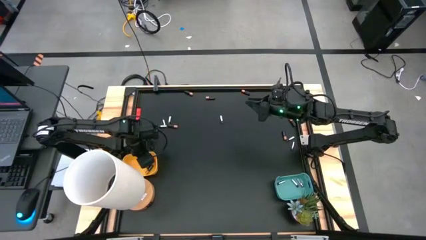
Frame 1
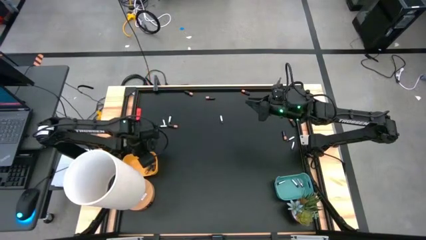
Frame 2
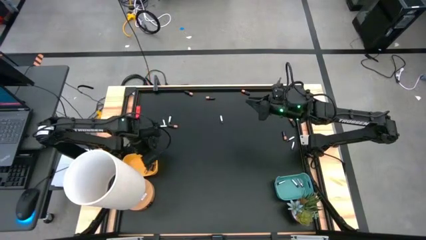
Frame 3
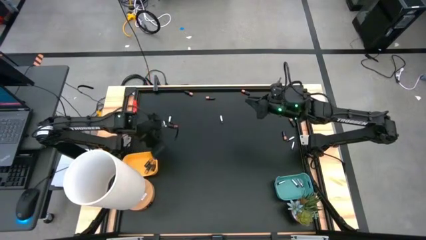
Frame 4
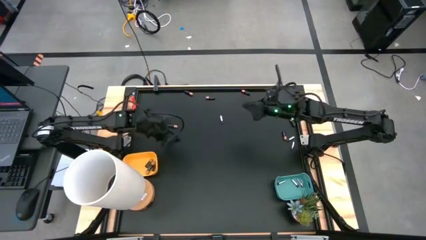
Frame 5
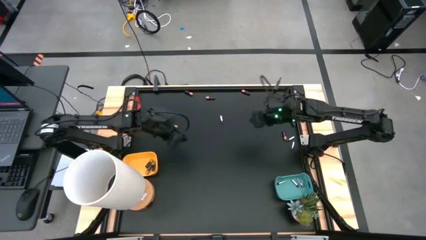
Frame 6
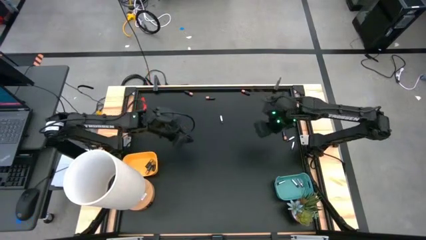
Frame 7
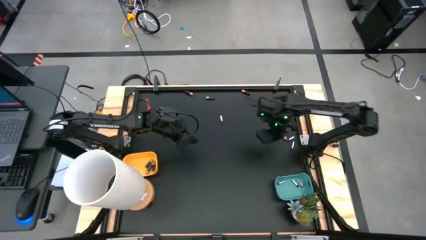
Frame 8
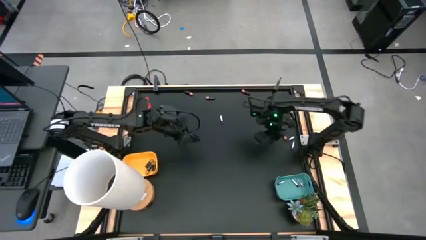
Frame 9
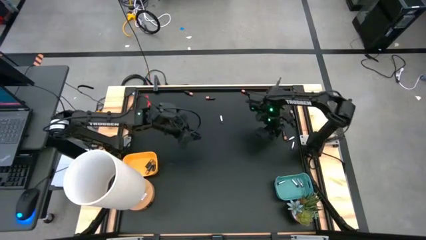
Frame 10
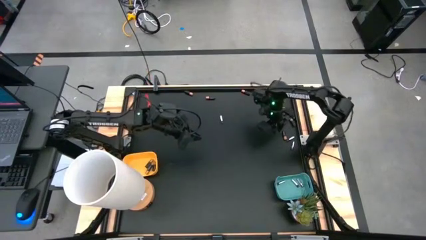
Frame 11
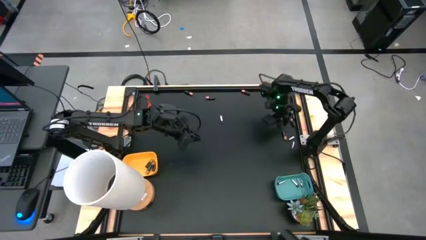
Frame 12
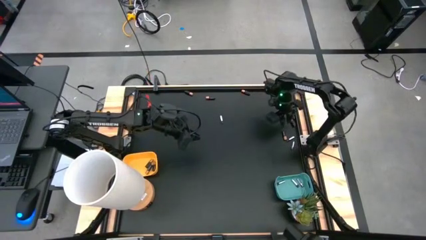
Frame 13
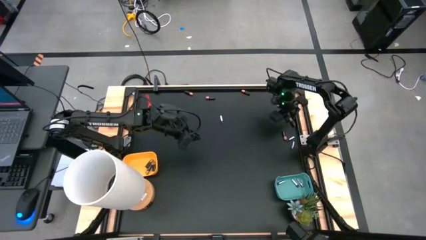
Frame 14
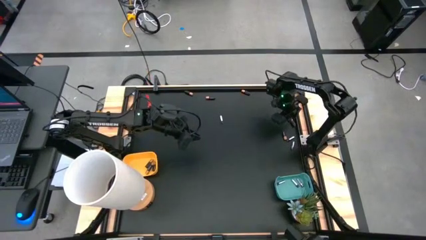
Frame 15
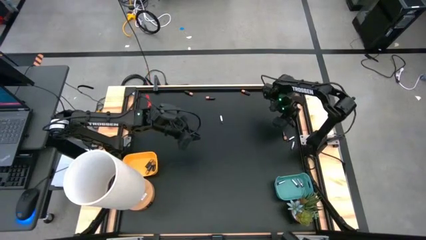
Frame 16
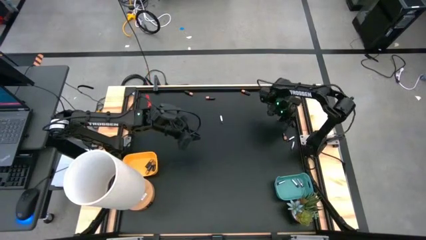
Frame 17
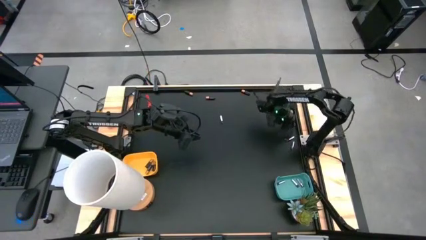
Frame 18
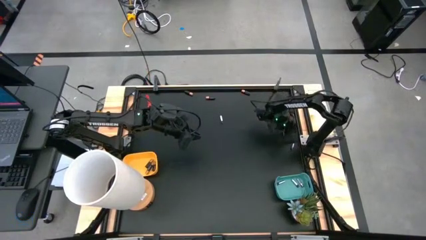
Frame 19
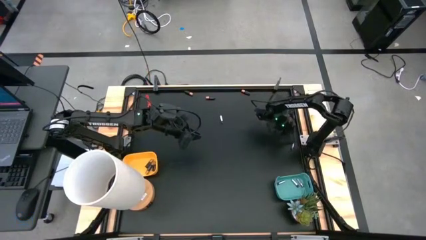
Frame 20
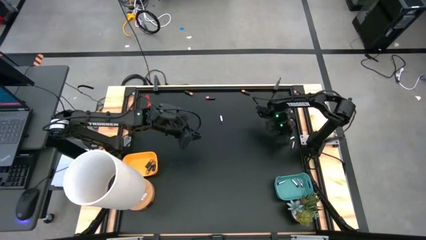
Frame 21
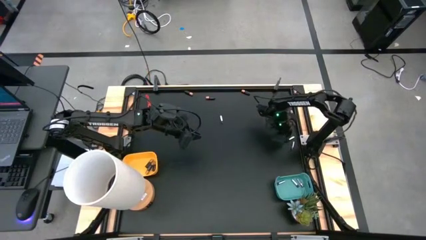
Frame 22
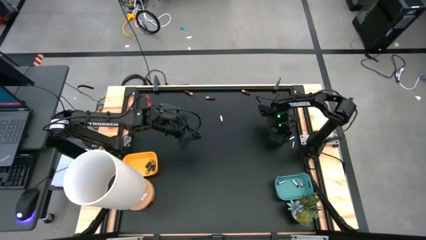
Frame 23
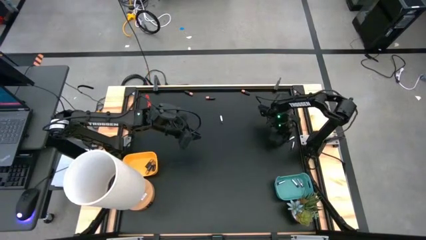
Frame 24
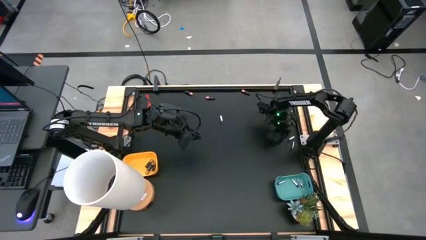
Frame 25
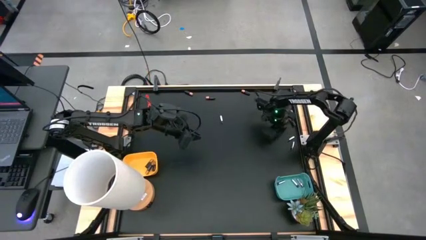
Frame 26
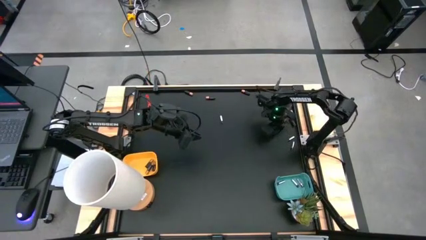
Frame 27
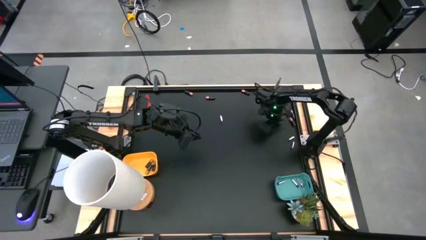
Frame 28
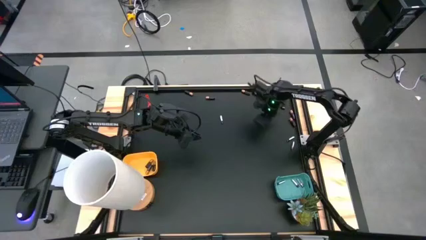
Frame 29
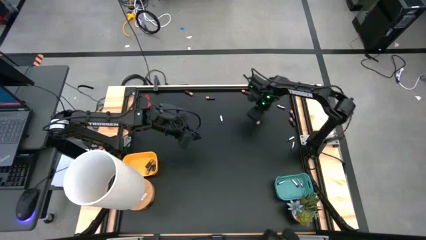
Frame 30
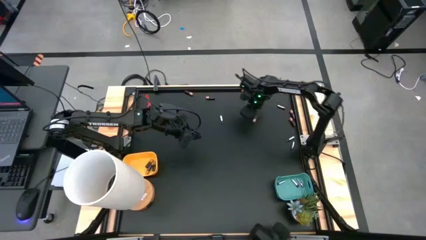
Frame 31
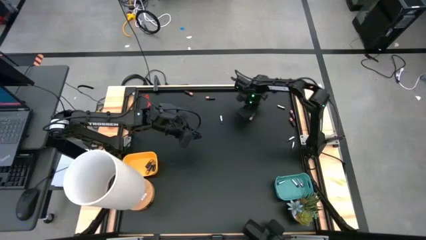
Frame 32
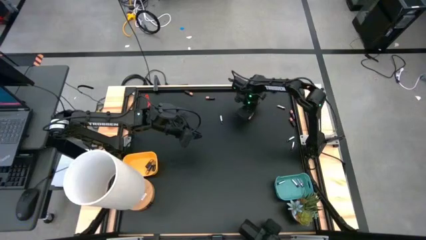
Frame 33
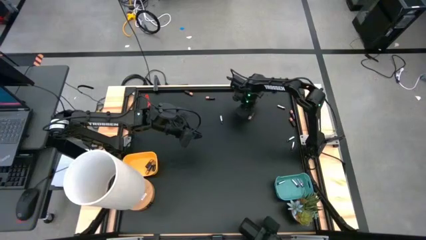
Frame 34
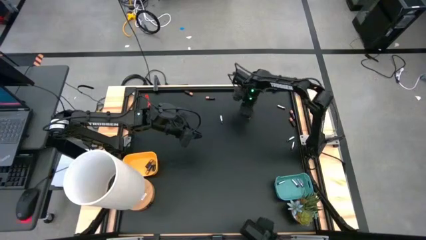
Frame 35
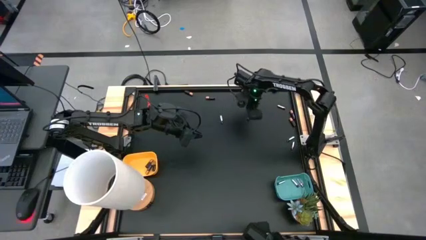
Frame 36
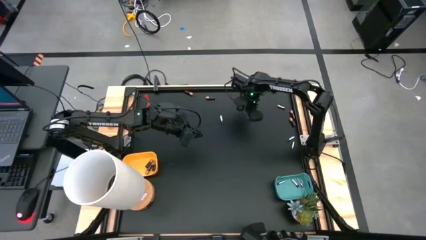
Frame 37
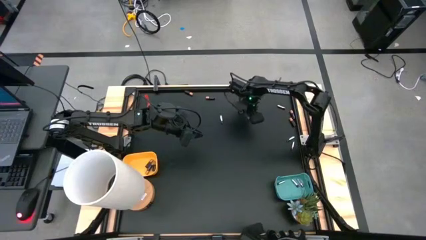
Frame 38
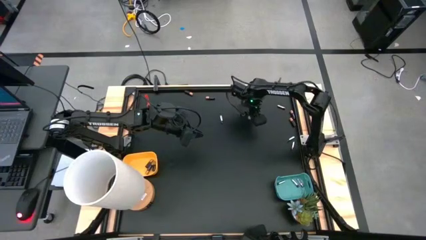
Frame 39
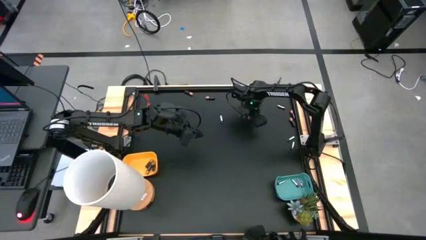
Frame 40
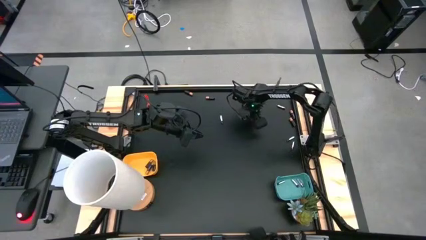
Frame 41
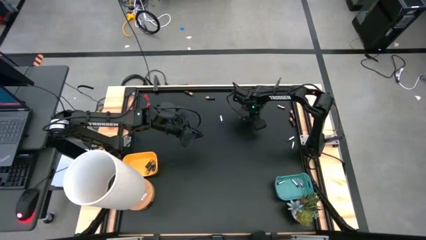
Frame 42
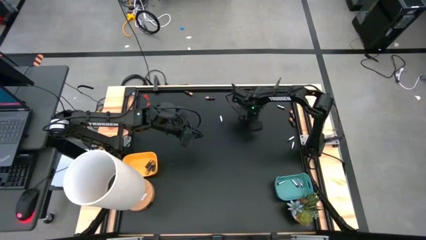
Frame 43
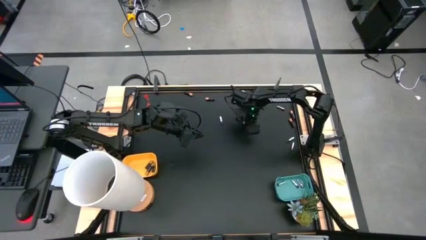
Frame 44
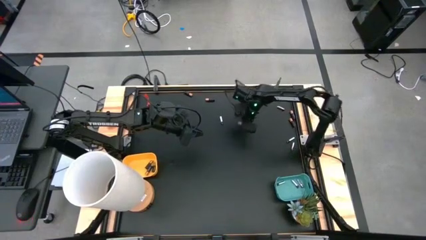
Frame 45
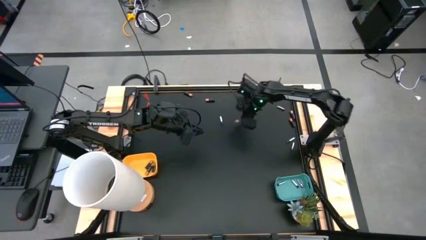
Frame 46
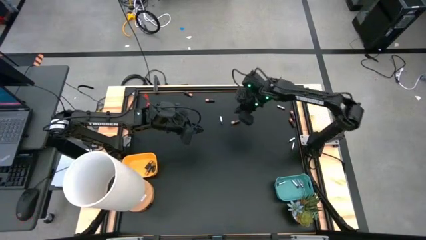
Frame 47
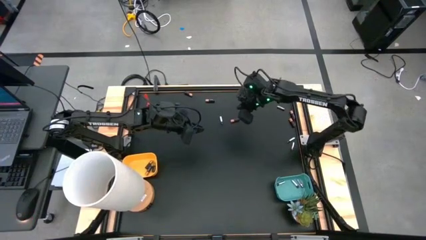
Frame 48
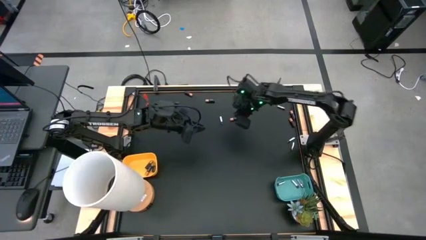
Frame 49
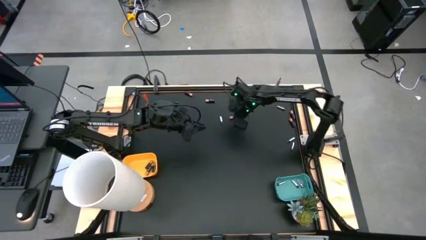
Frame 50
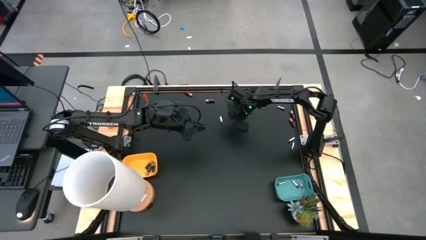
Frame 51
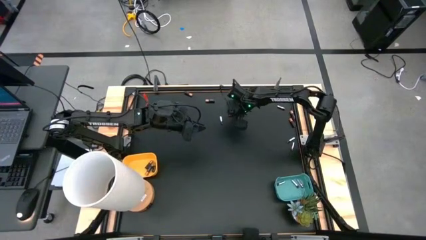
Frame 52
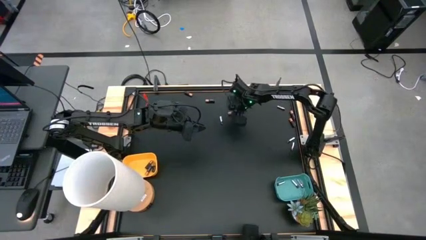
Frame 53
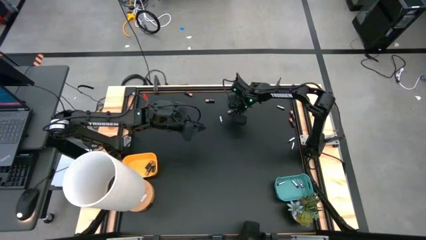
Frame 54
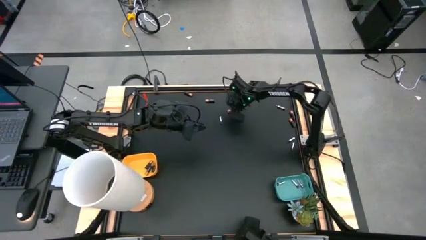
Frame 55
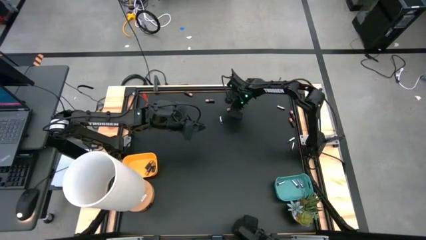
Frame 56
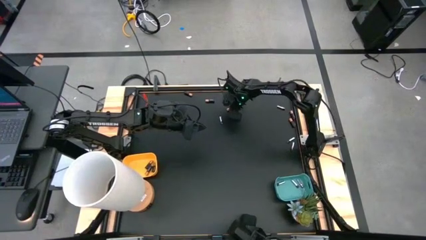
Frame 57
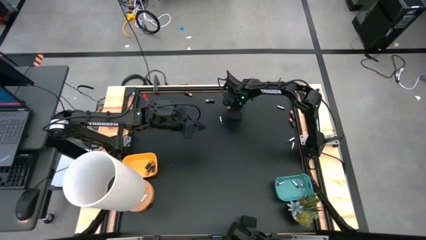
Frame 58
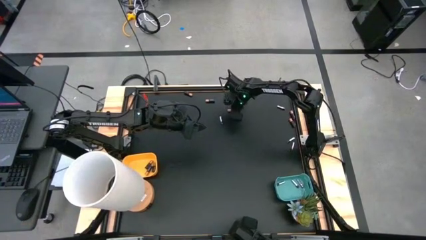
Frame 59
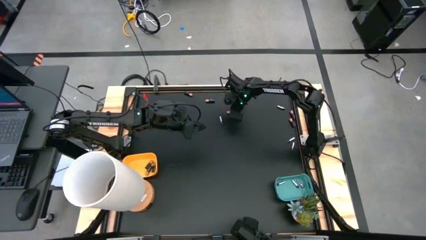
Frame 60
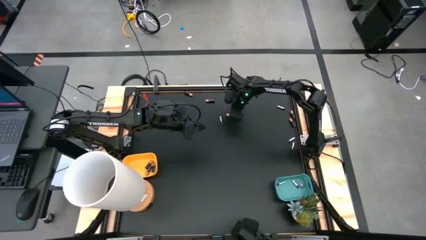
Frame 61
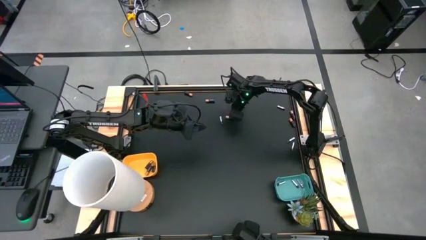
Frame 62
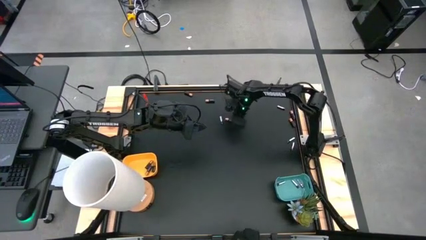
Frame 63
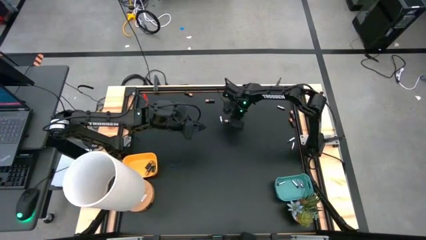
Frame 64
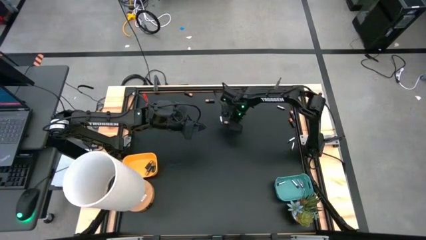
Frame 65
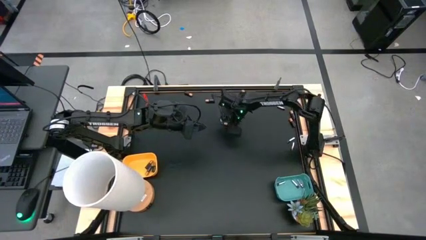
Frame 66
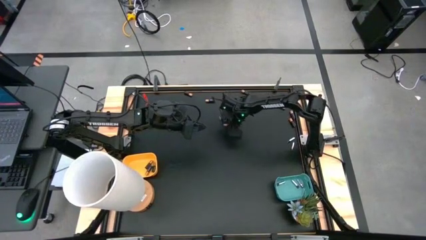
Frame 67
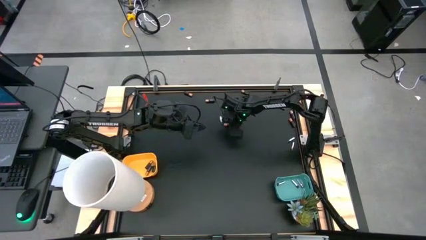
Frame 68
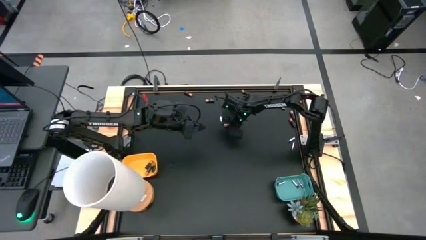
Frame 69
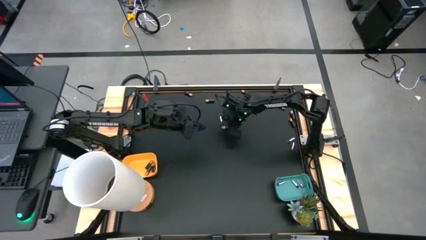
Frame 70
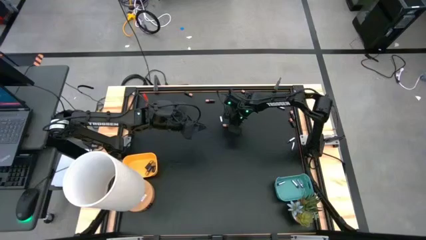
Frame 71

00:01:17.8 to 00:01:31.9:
Task: Sort batteries
Put the black battery into the yellow bin

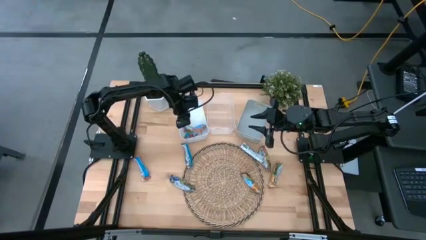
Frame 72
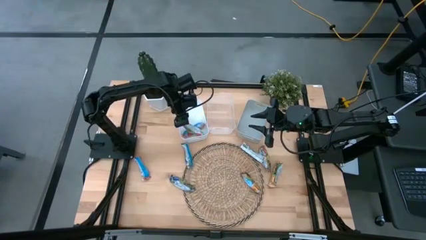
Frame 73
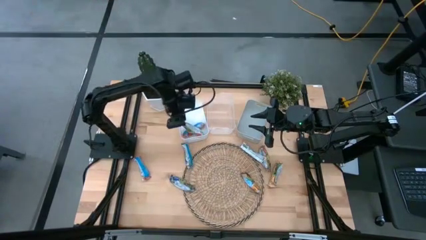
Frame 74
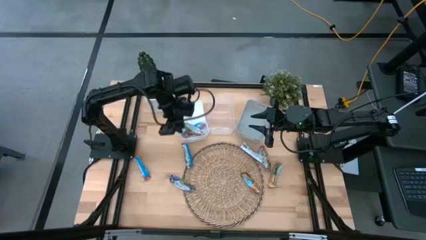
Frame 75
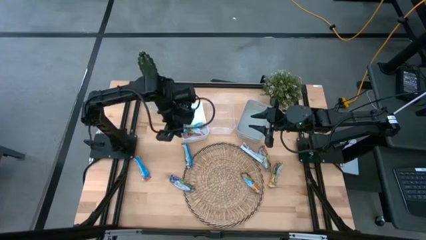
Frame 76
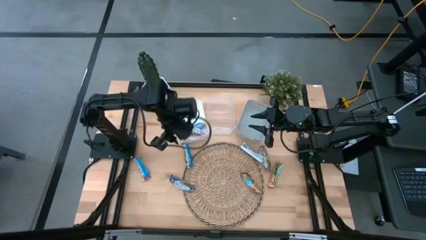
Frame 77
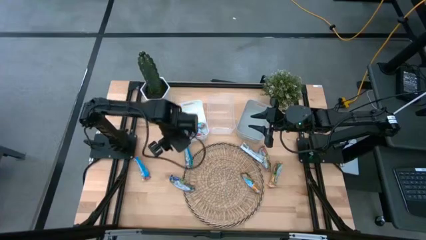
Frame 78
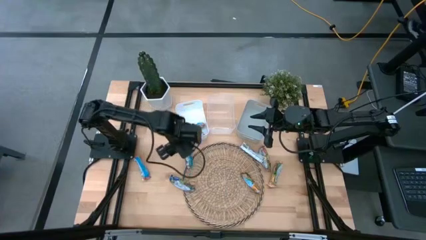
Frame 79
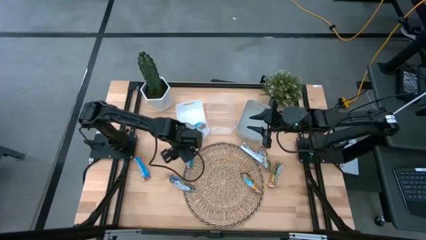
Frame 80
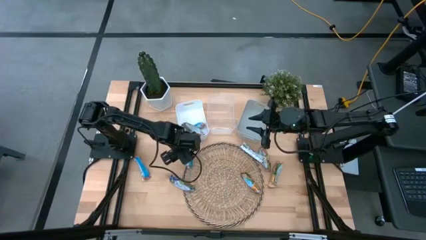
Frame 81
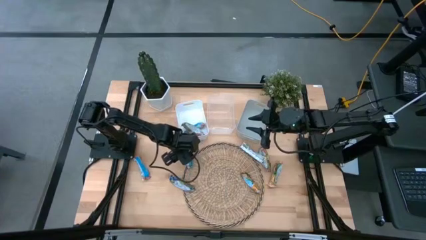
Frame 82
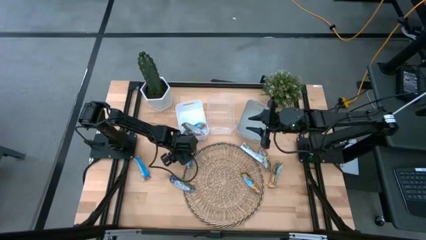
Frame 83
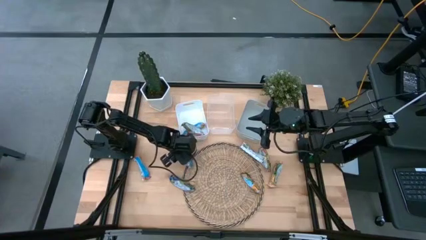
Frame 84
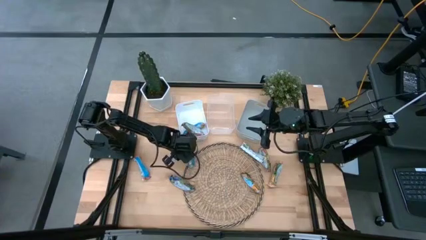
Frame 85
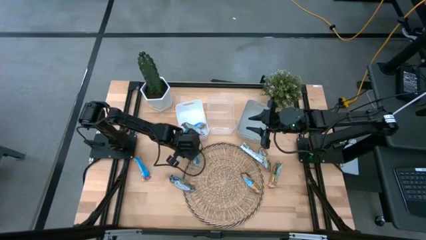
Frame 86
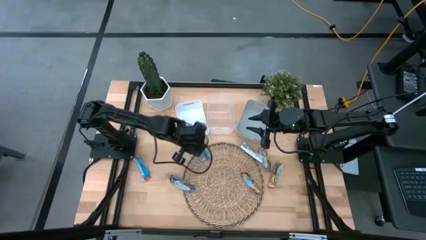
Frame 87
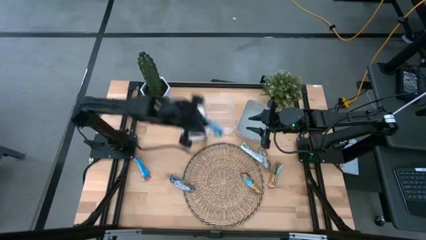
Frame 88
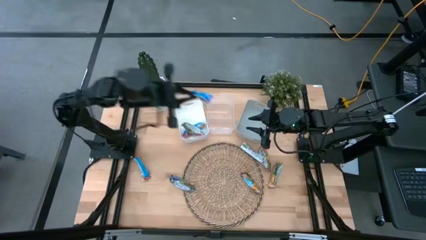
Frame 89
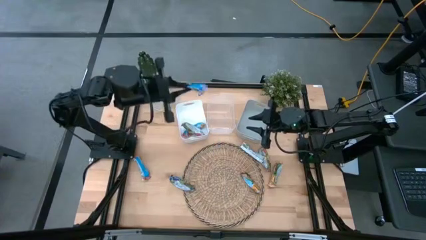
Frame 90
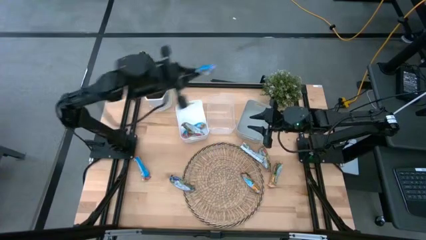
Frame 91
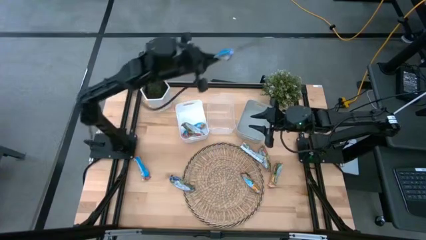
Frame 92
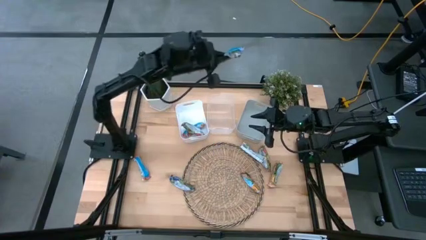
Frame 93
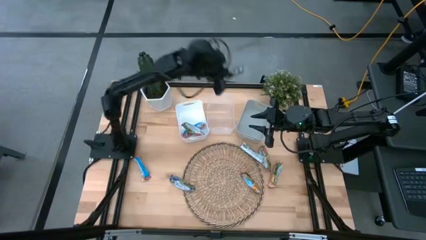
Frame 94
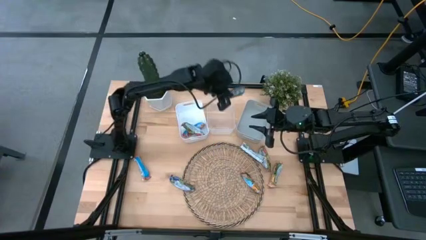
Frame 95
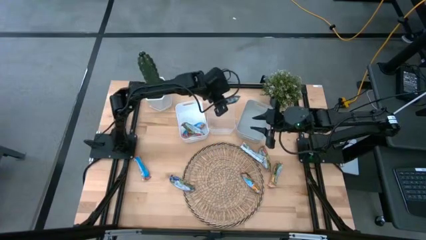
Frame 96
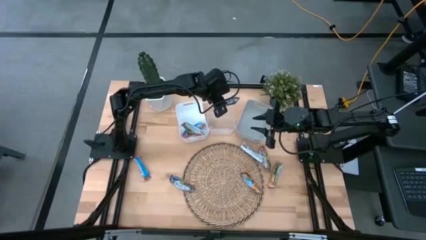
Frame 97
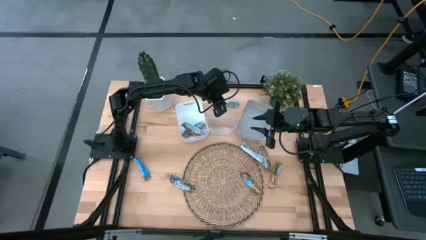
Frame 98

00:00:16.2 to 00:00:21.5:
Task: Pick and place Granola Bars by type
Put the blue granola bar into the transparent bin
